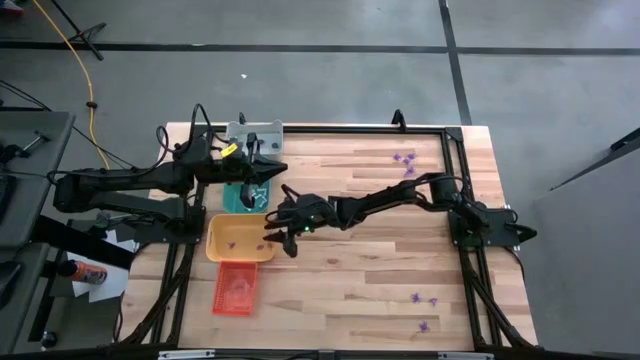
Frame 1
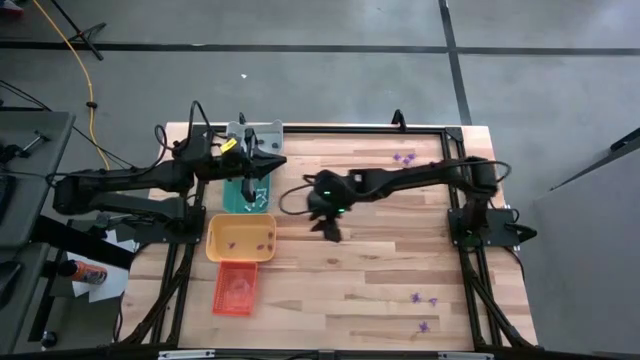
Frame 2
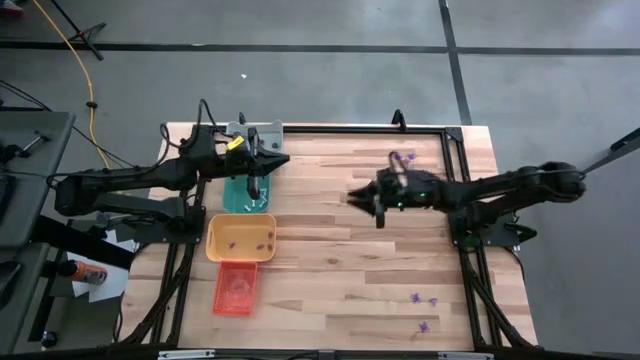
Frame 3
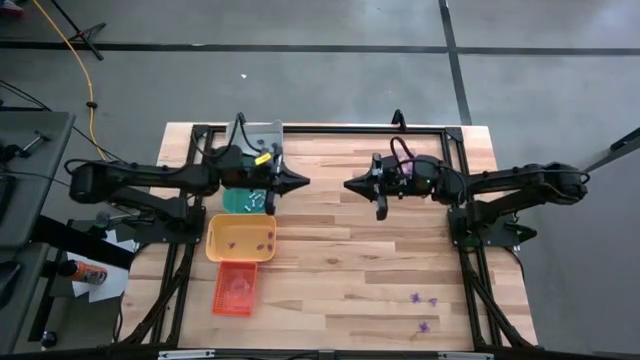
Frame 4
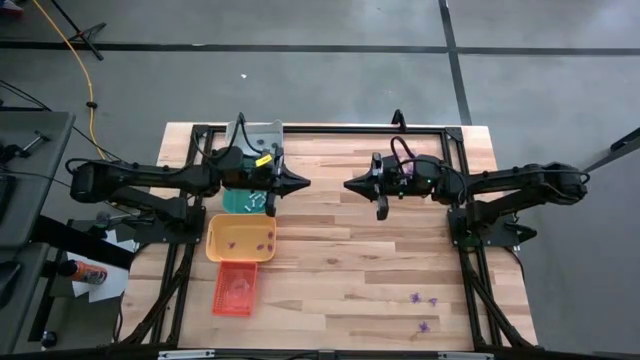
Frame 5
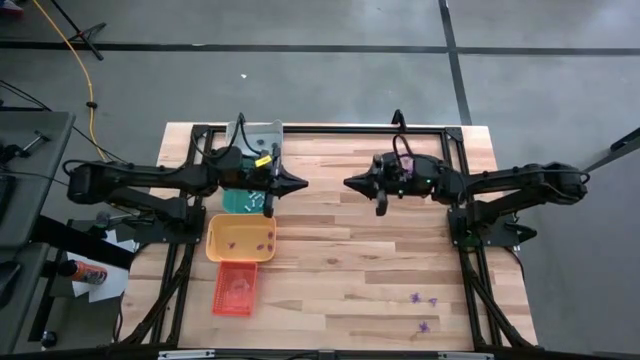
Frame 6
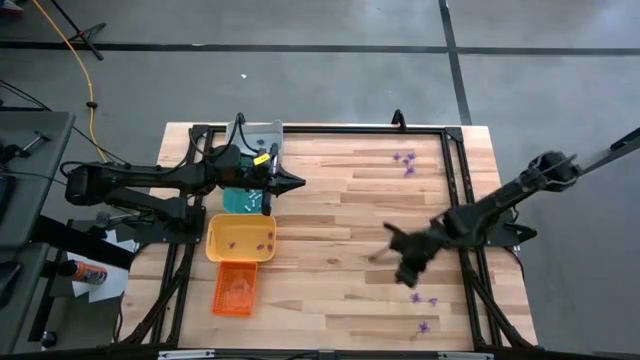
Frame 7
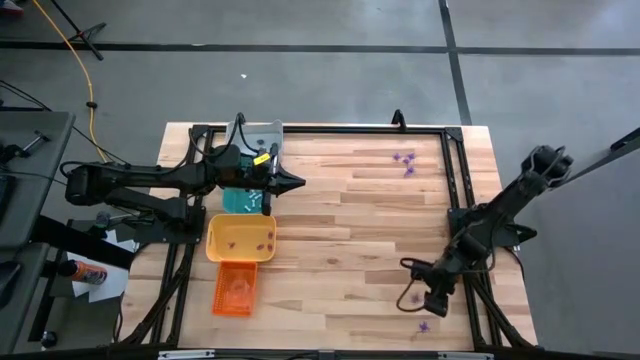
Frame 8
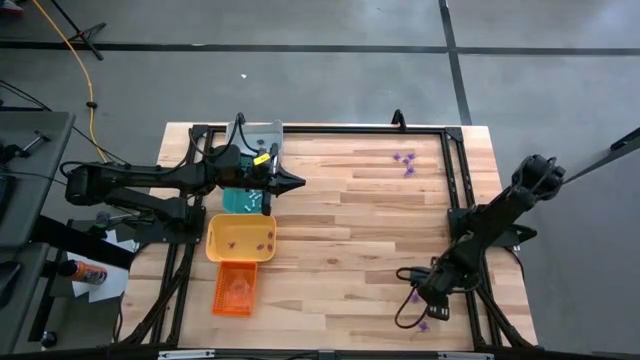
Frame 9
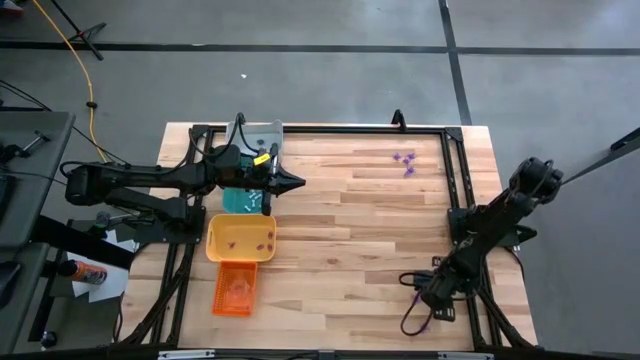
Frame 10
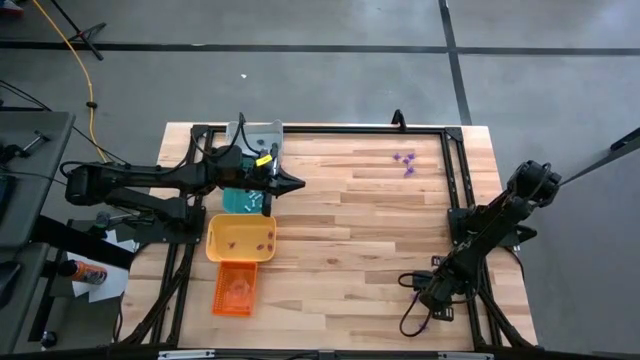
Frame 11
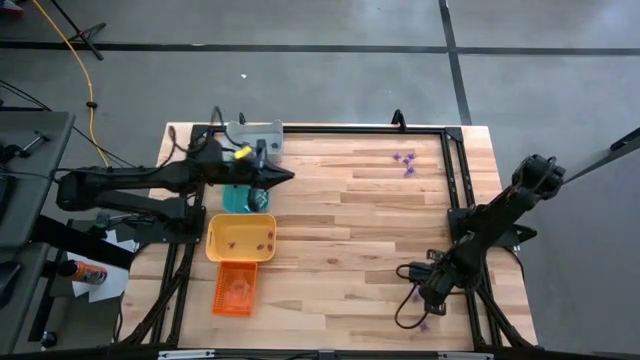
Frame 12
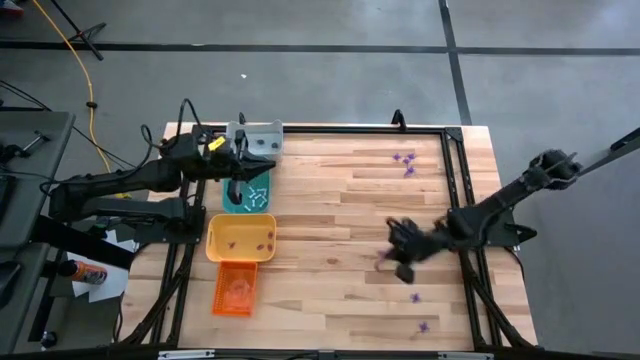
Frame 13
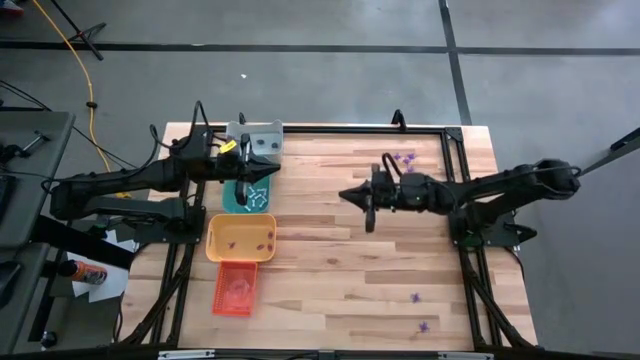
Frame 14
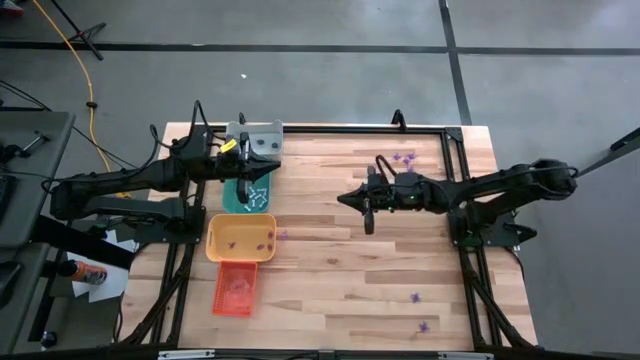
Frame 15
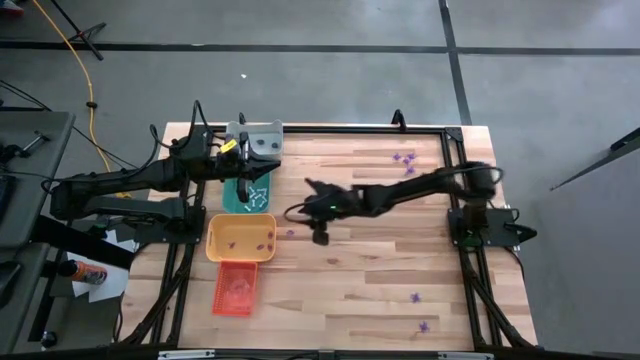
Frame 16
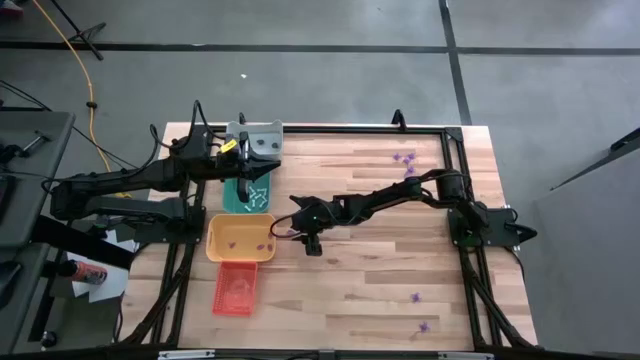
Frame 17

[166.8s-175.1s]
Task: Sort Halloween decoration
Put the purple witch hat toy in the yellow bin

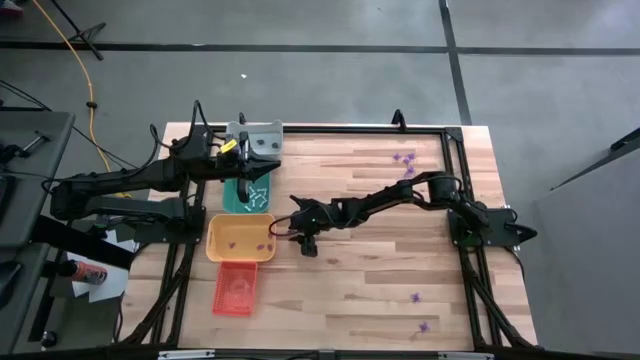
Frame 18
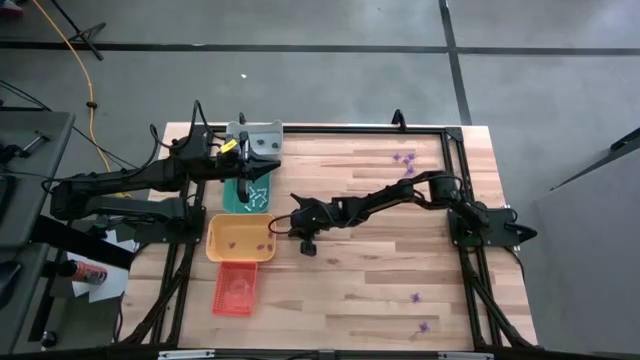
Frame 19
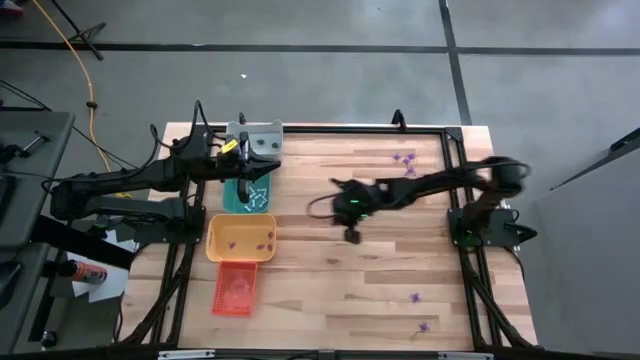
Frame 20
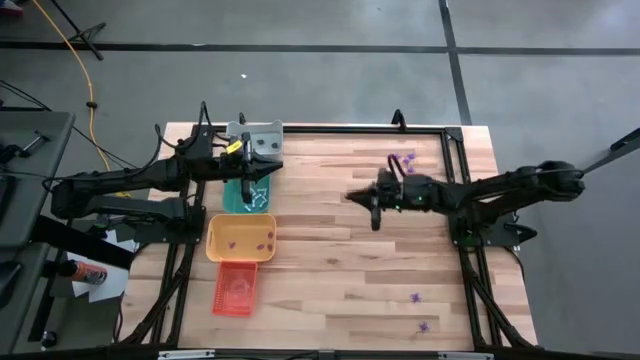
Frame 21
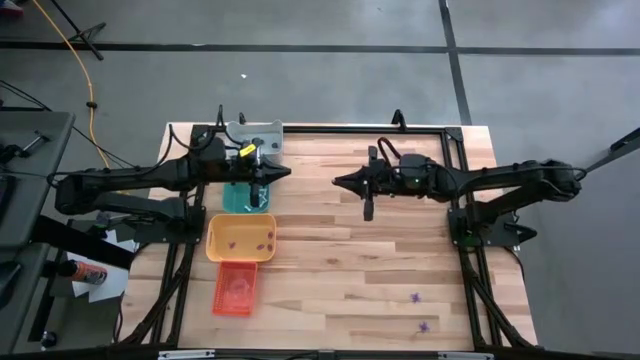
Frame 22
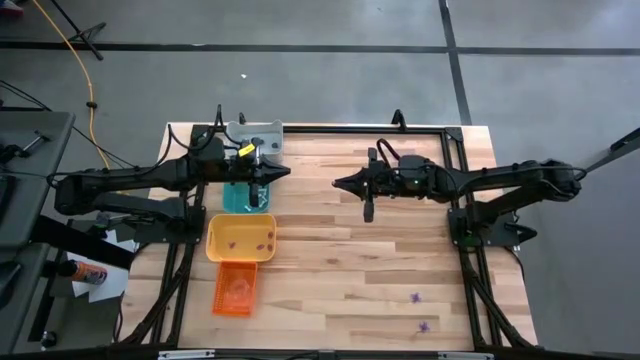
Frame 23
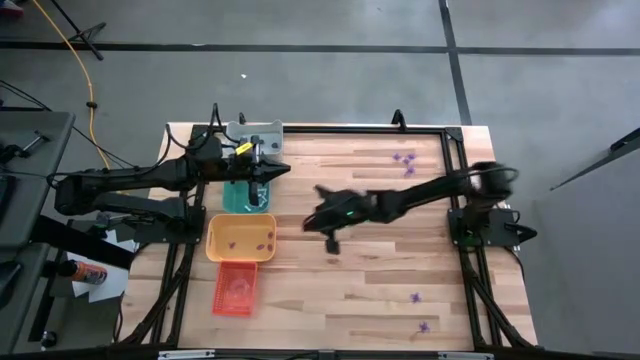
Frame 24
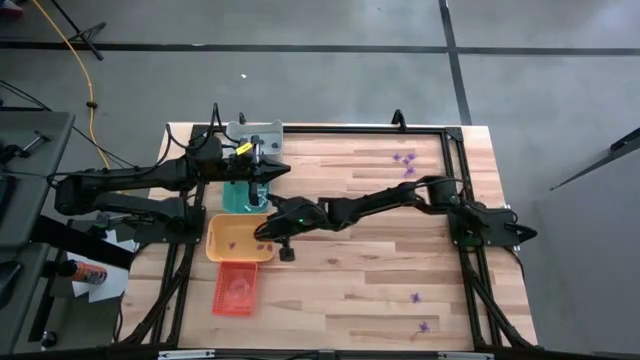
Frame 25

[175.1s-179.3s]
Put the purple witch hat toy in the yellow bin

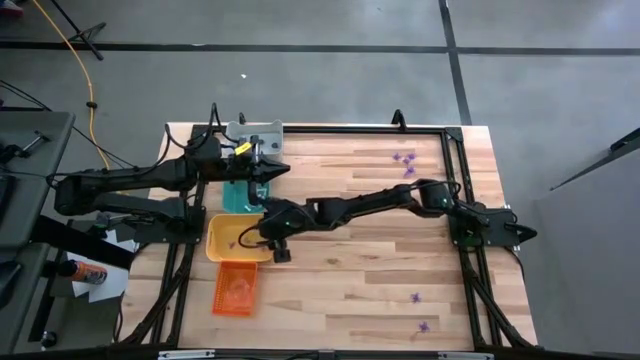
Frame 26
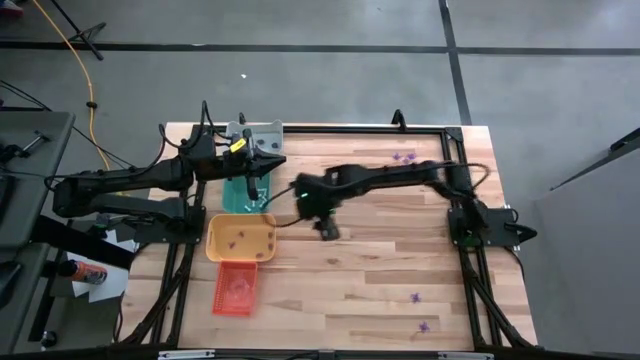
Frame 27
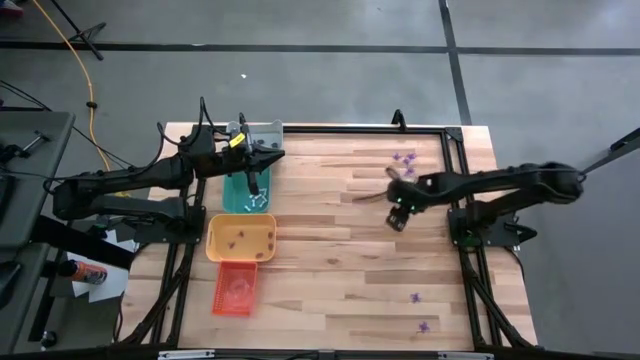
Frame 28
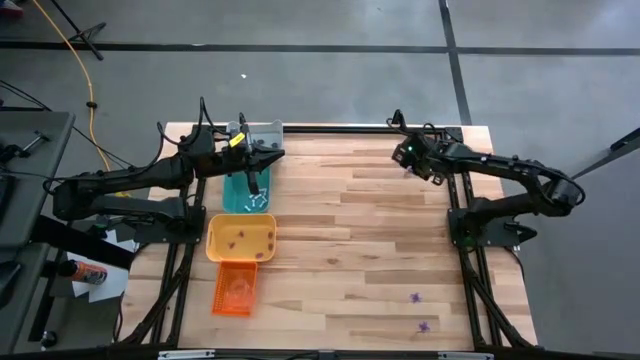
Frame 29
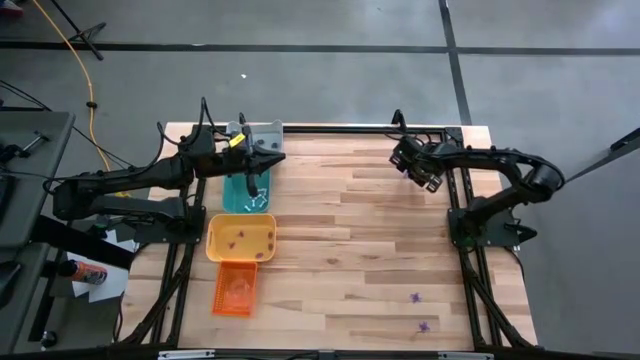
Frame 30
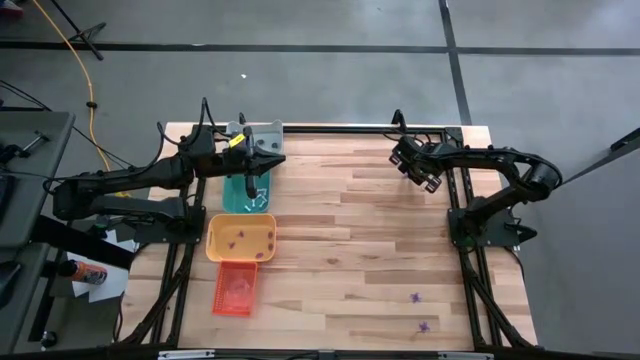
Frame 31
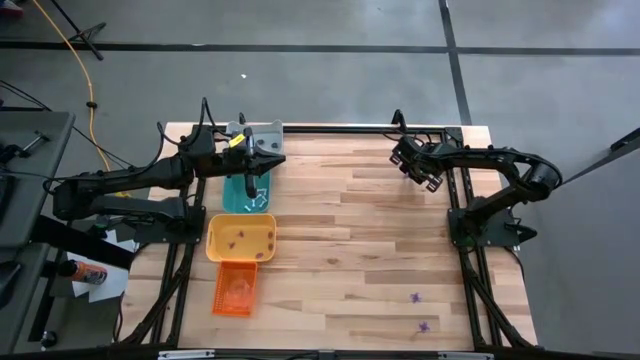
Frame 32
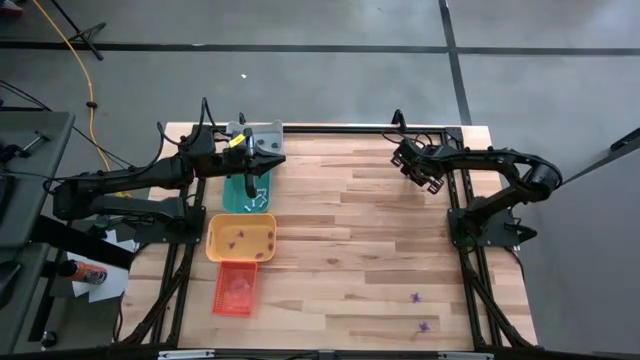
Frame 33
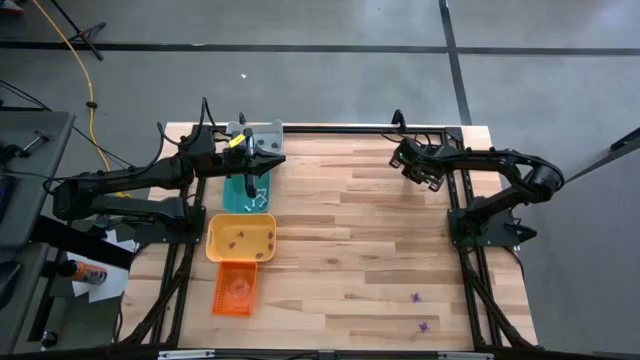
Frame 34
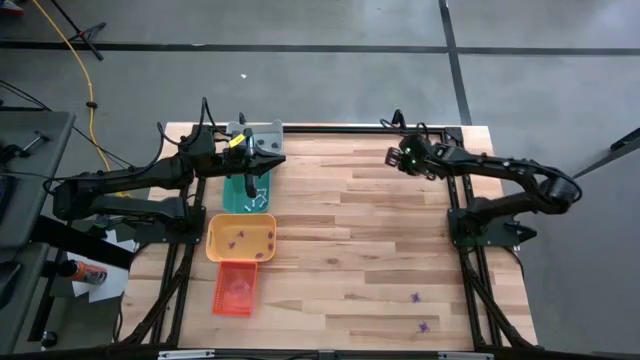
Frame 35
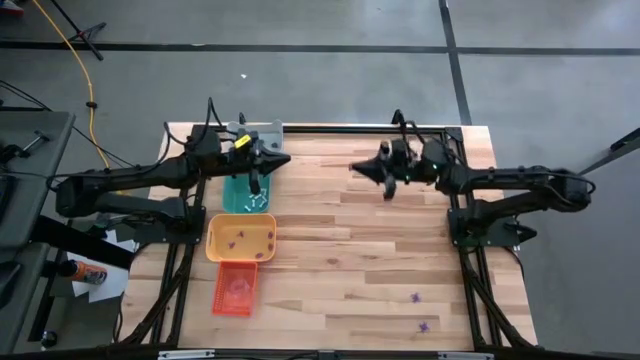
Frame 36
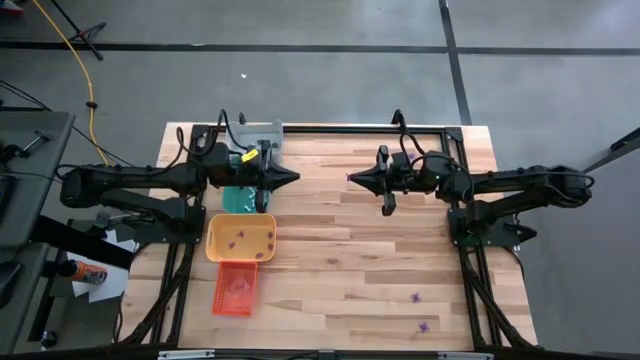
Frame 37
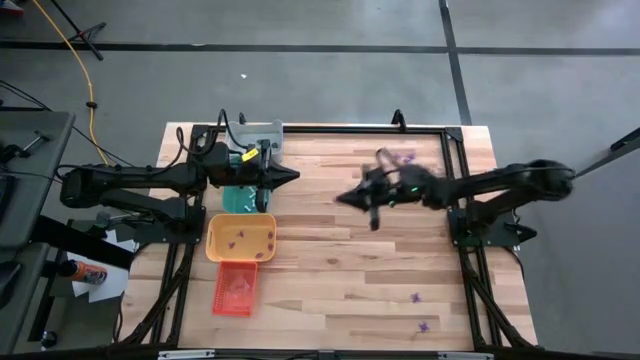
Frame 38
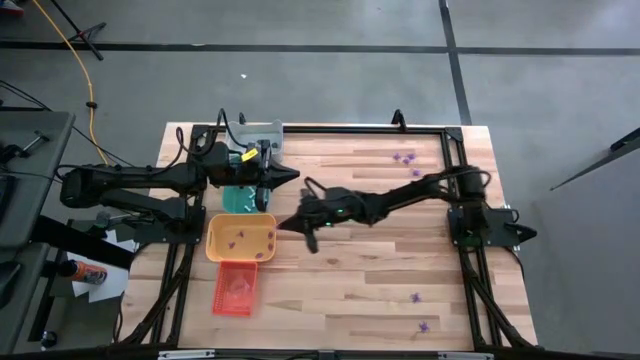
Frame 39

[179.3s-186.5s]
Put the purple witch hat toy in the yellow bin
